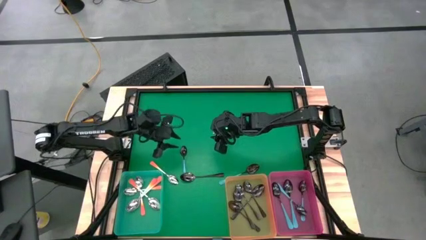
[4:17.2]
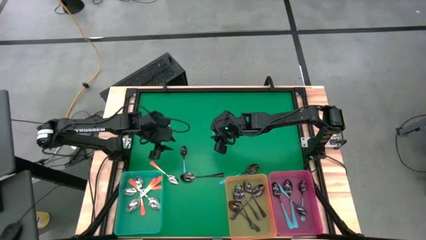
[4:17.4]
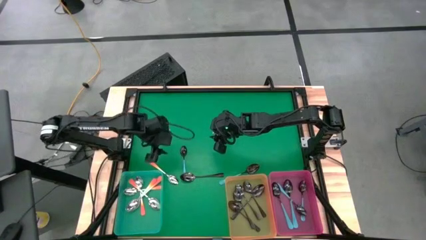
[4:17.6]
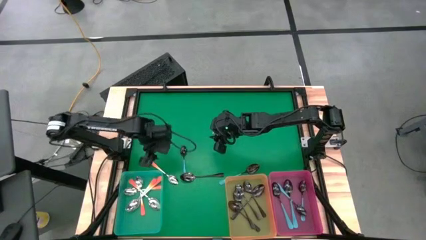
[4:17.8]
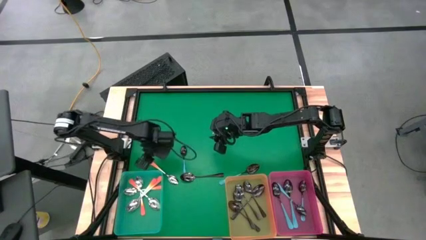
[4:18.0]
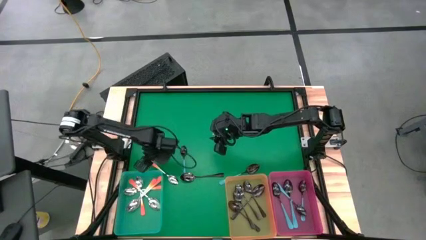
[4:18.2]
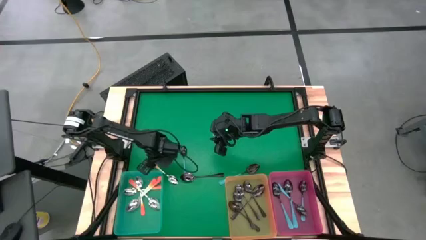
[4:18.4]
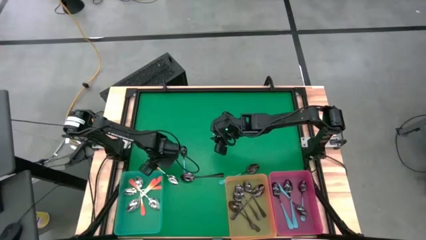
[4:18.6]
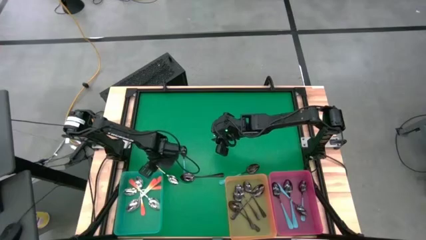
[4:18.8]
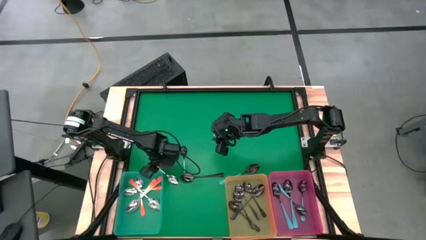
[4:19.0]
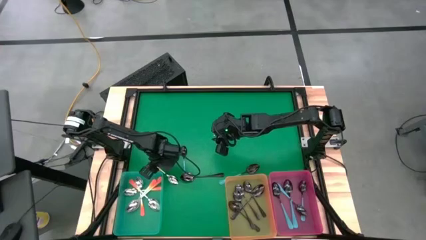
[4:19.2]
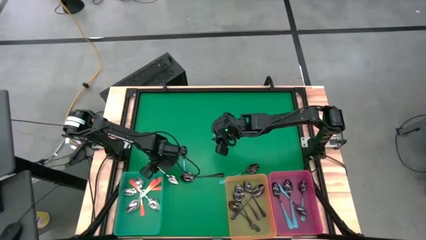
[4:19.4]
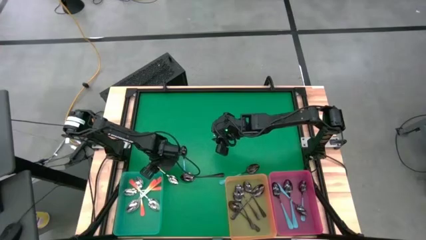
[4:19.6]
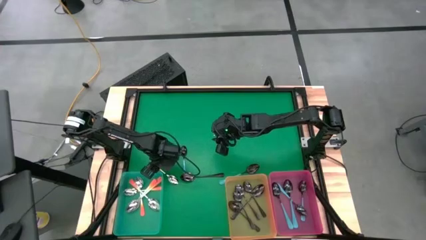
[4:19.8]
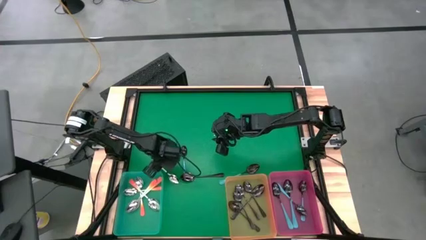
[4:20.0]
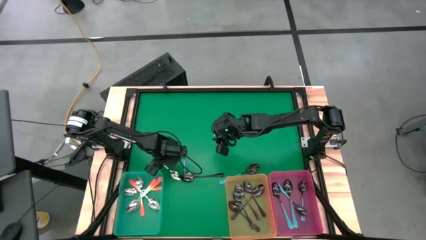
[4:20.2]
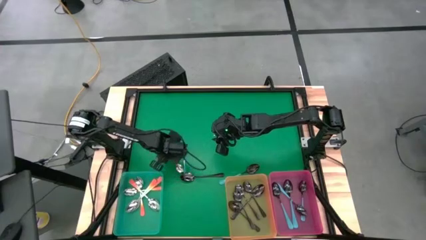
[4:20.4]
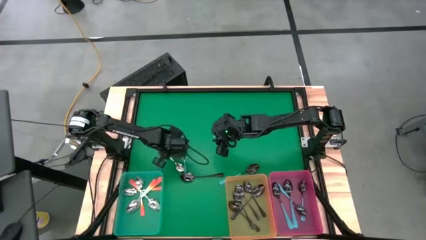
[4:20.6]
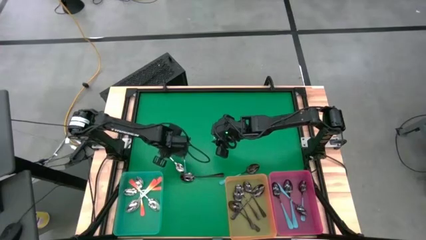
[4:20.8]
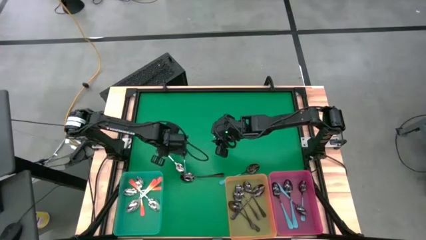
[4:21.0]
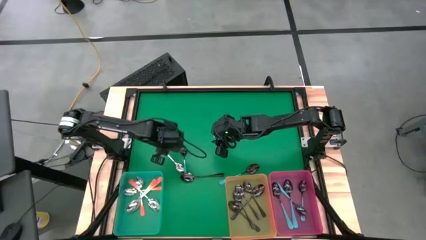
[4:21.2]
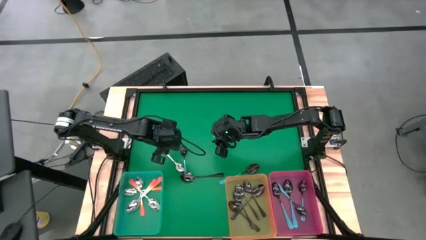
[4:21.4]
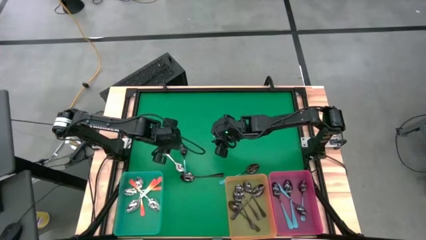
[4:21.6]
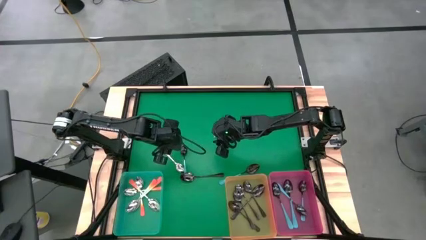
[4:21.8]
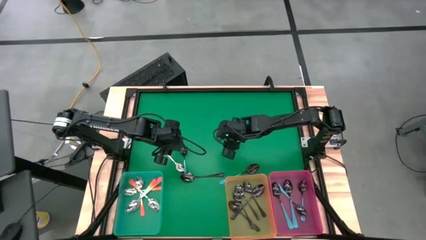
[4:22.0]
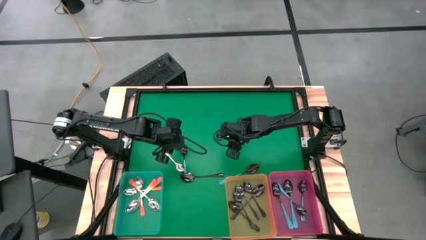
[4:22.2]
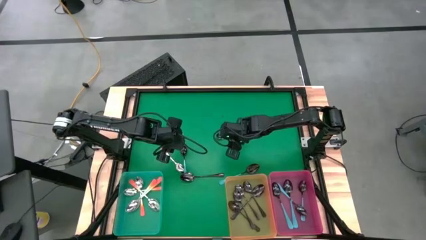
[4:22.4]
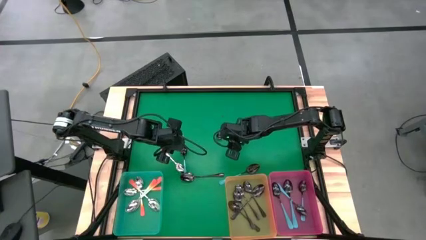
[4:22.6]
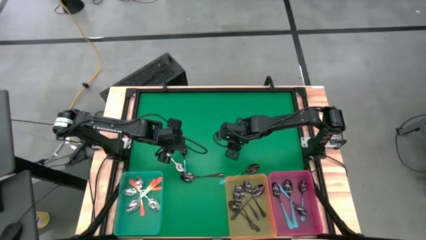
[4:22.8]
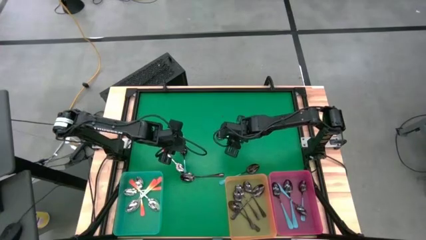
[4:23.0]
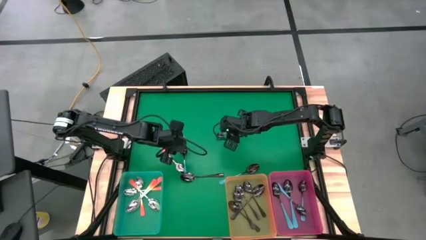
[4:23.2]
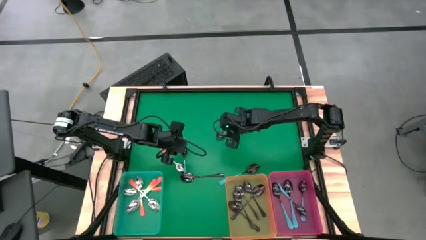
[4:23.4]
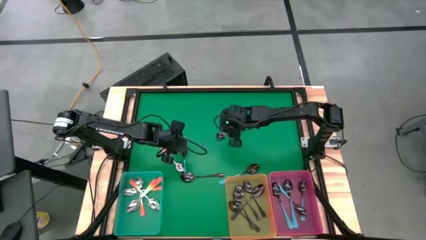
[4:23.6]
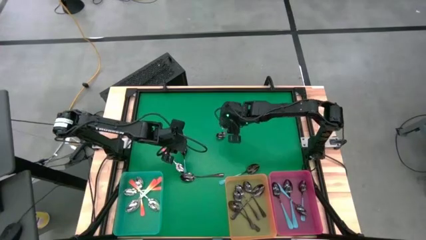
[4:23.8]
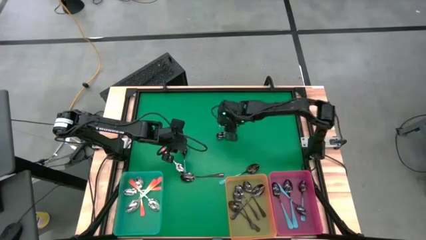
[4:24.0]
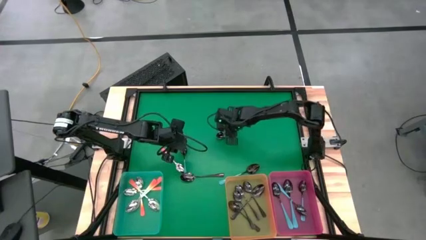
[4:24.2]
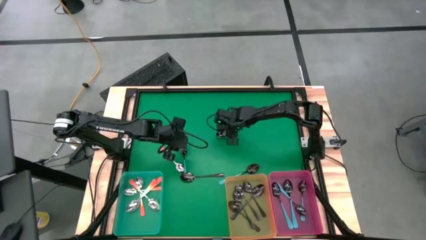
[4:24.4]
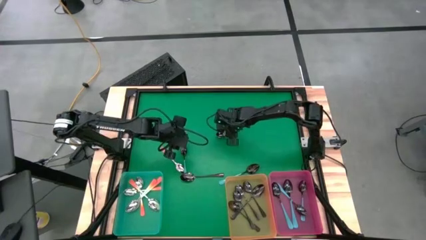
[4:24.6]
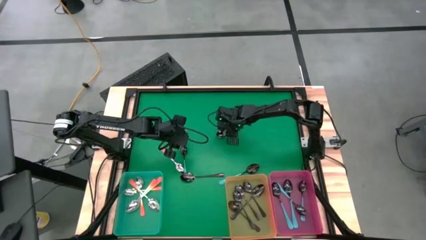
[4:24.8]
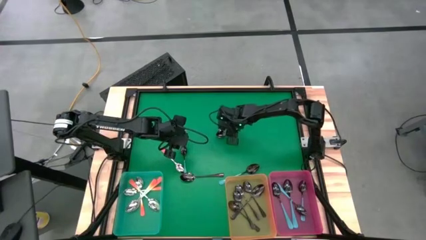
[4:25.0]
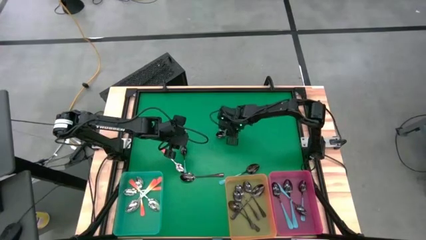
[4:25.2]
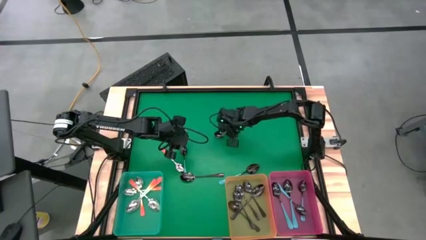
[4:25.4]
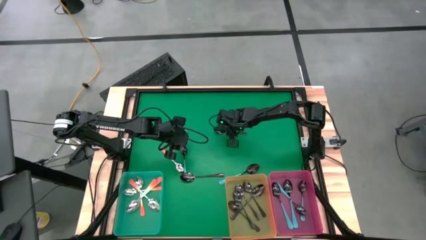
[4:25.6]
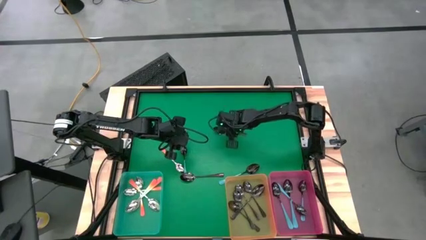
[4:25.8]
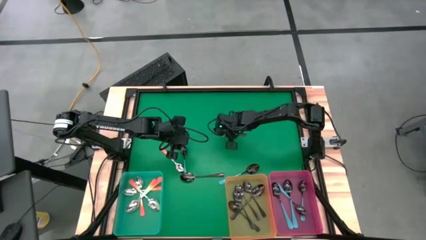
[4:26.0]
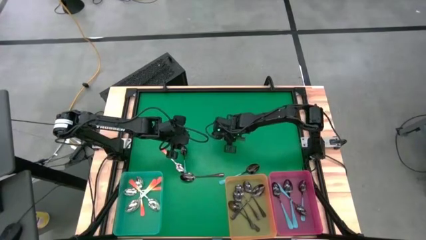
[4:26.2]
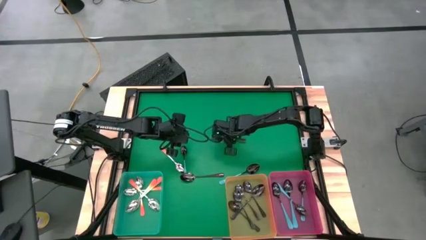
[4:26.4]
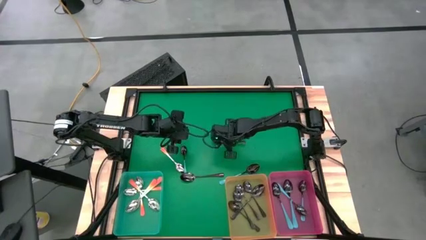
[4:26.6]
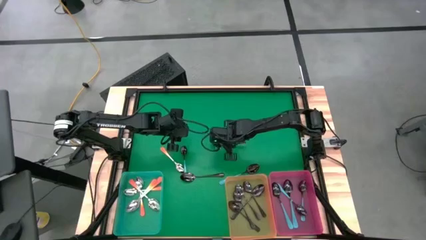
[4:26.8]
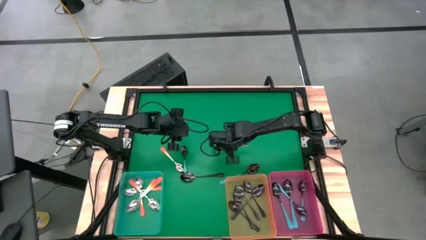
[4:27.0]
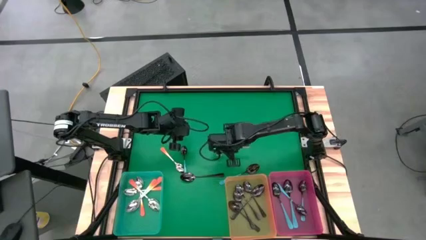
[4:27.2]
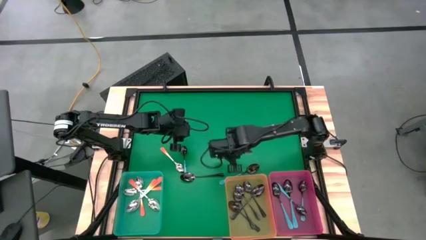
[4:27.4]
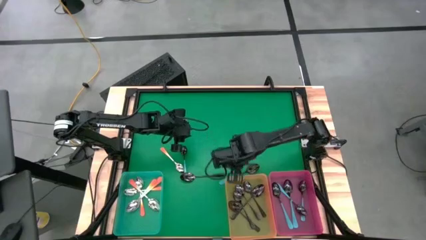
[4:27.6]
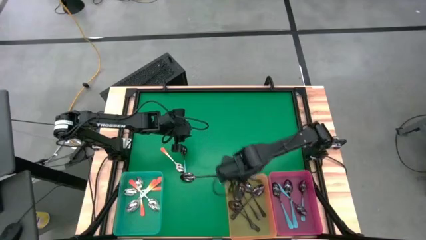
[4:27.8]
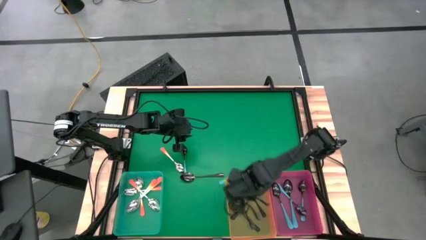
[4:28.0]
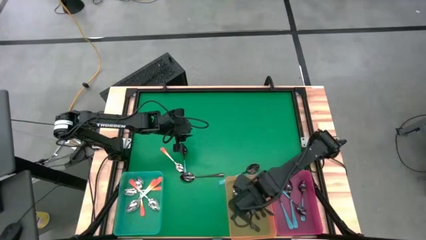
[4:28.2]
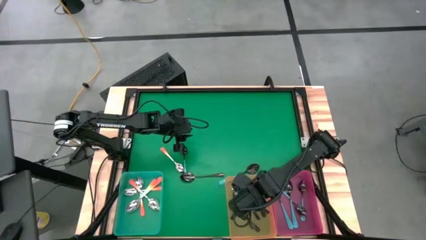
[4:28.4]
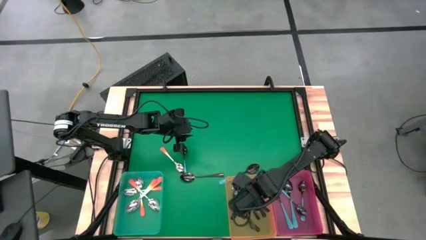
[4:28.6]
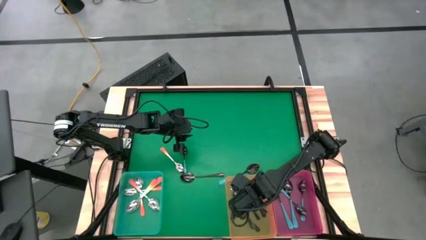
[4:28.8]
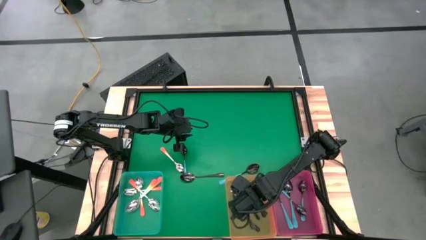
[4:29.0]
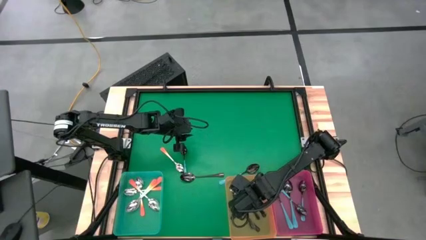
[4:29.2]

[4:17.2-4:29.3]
Task: Sort silverware by color (type)
Put the black spoon into the orange bin
